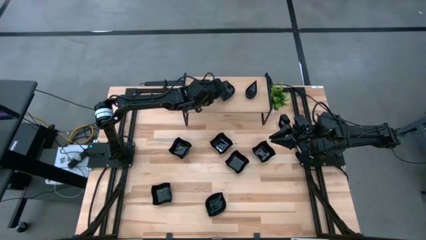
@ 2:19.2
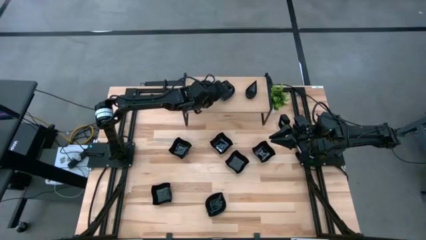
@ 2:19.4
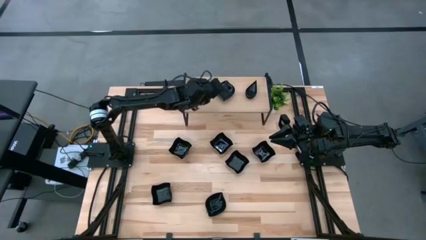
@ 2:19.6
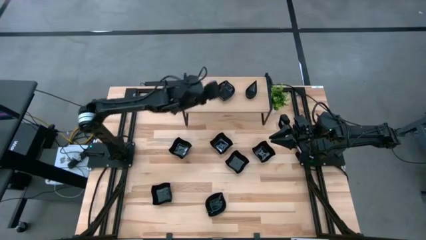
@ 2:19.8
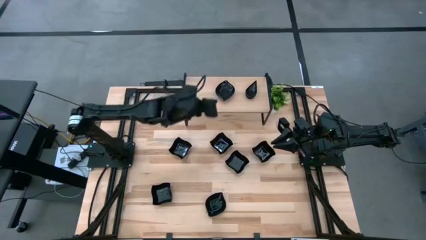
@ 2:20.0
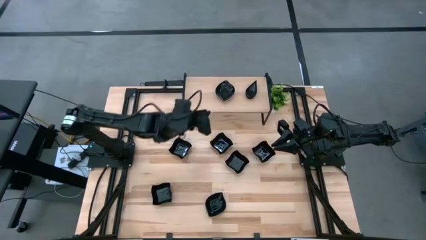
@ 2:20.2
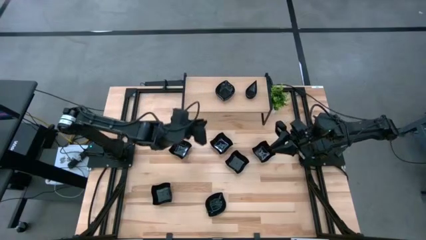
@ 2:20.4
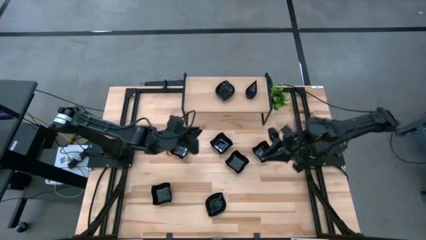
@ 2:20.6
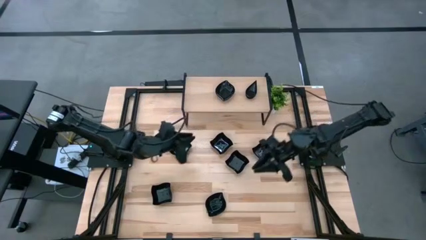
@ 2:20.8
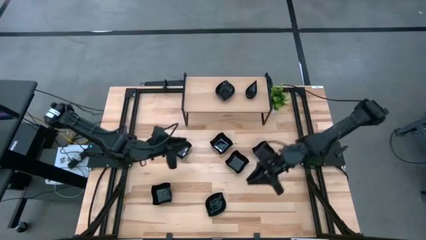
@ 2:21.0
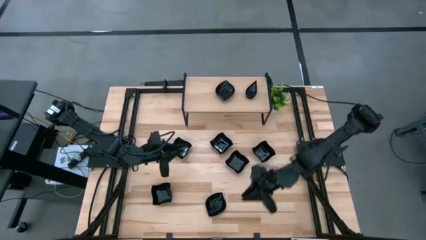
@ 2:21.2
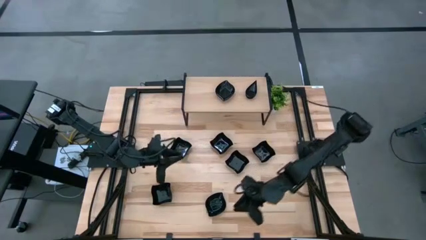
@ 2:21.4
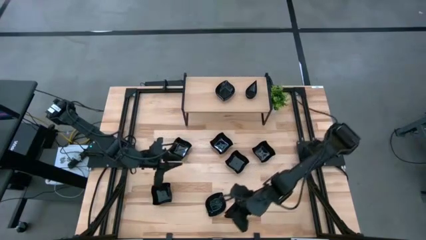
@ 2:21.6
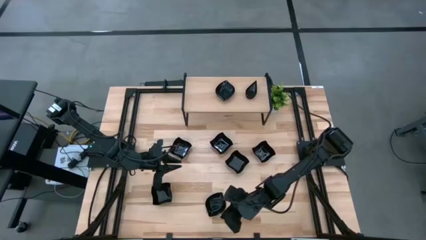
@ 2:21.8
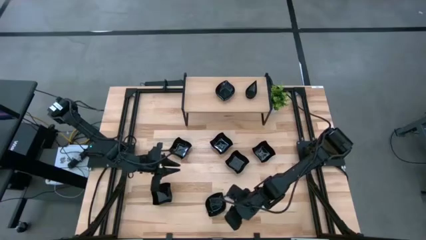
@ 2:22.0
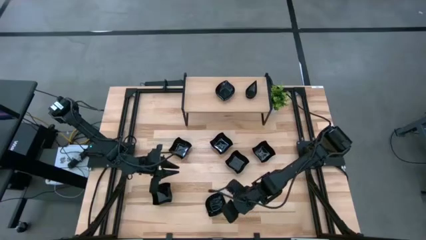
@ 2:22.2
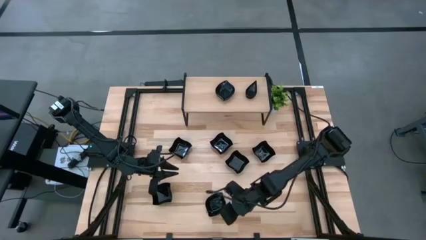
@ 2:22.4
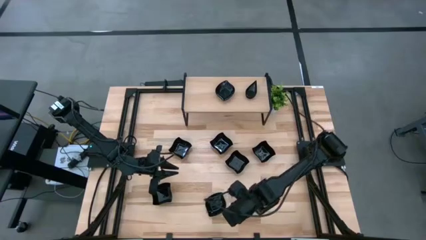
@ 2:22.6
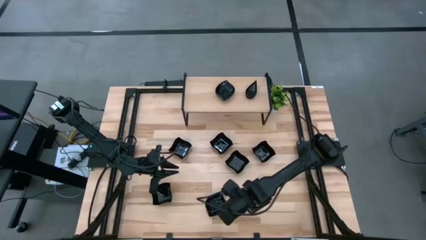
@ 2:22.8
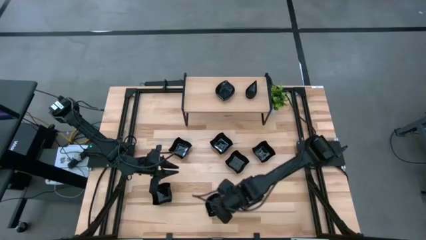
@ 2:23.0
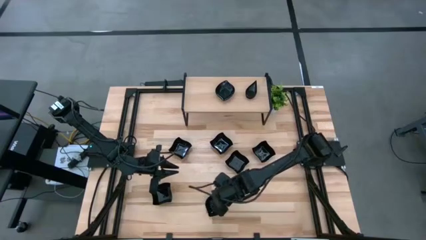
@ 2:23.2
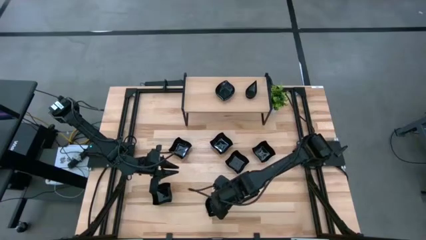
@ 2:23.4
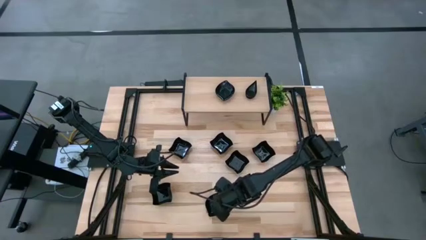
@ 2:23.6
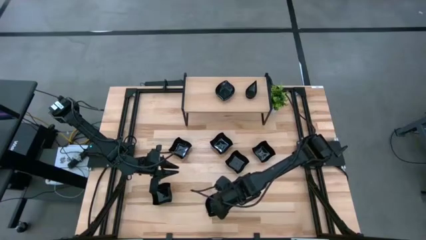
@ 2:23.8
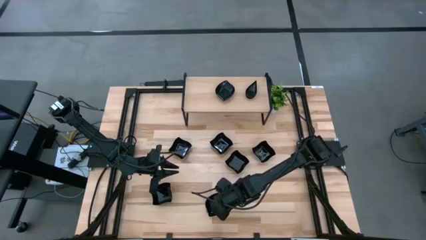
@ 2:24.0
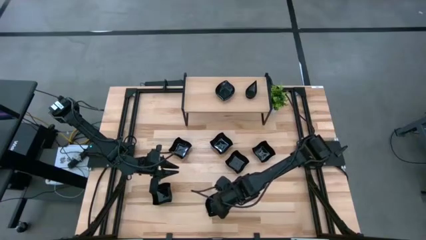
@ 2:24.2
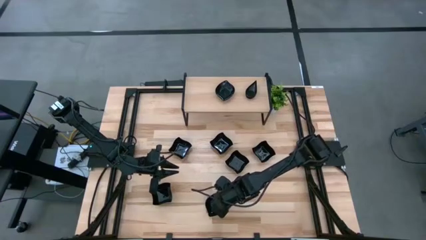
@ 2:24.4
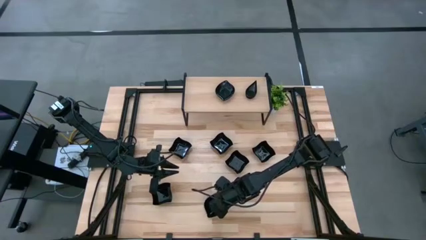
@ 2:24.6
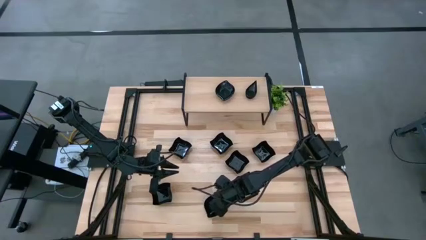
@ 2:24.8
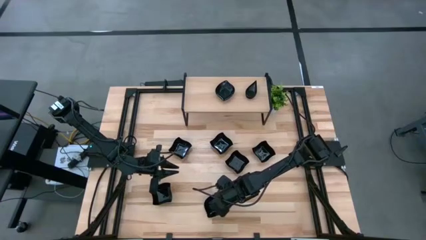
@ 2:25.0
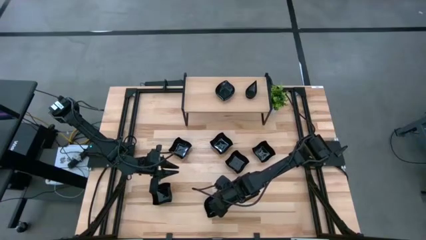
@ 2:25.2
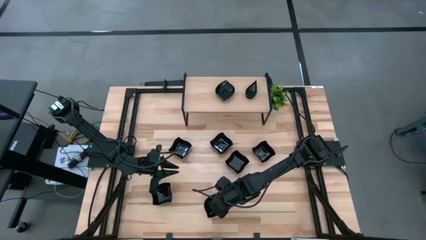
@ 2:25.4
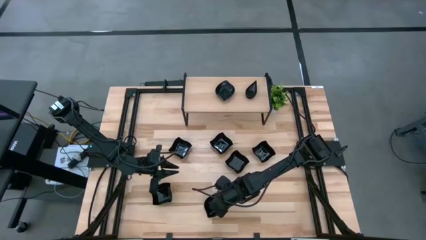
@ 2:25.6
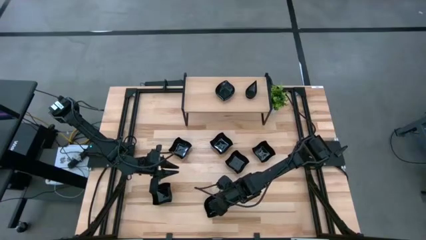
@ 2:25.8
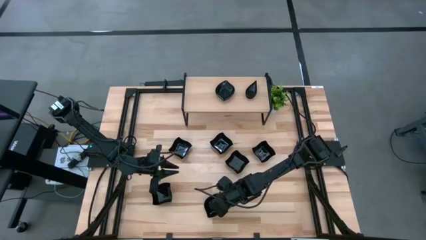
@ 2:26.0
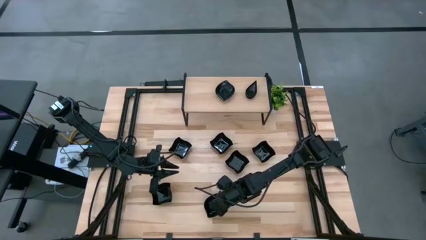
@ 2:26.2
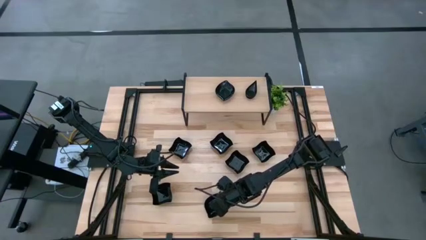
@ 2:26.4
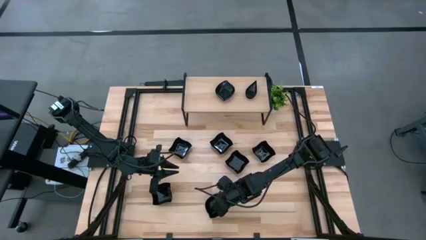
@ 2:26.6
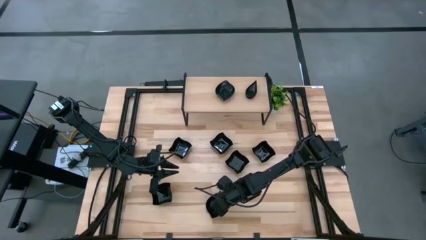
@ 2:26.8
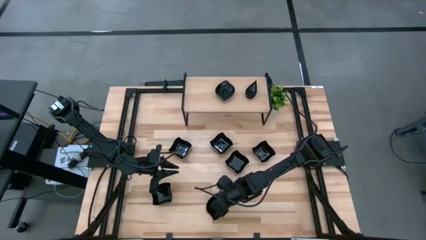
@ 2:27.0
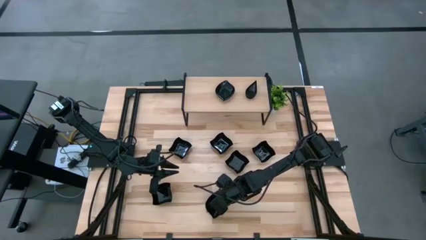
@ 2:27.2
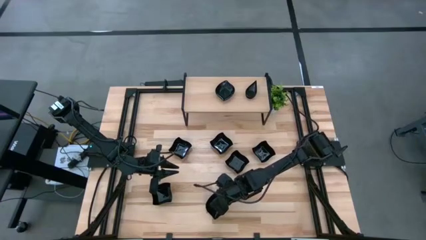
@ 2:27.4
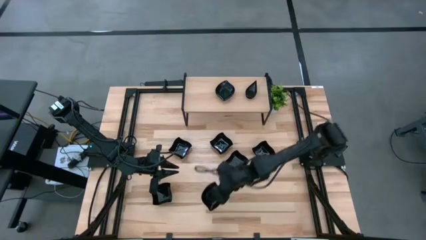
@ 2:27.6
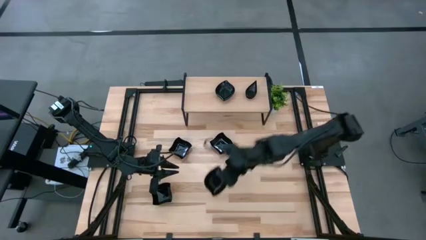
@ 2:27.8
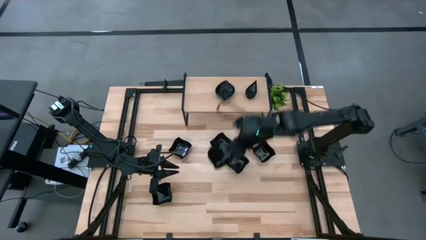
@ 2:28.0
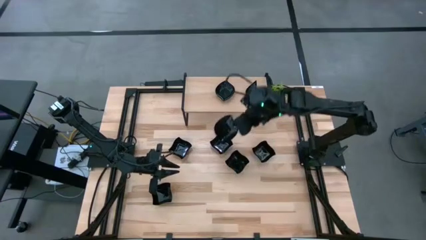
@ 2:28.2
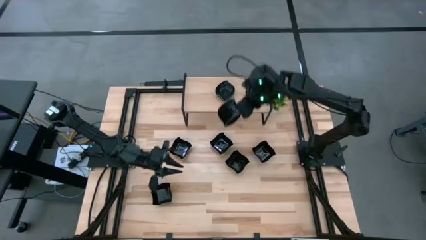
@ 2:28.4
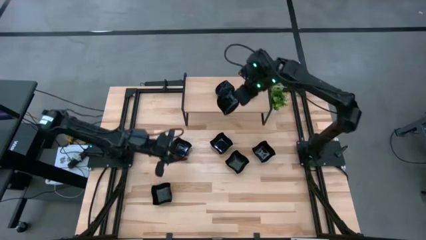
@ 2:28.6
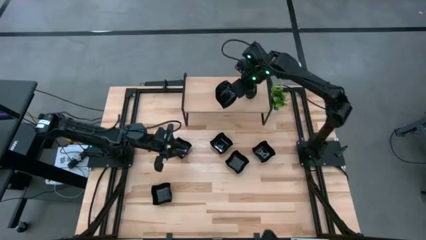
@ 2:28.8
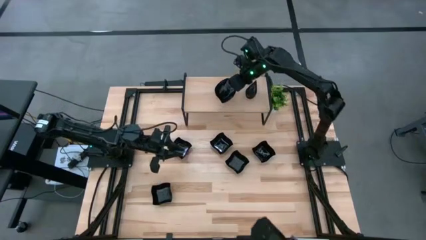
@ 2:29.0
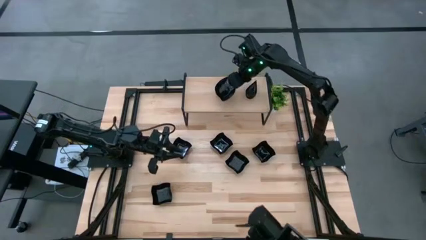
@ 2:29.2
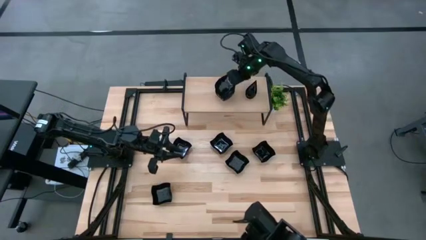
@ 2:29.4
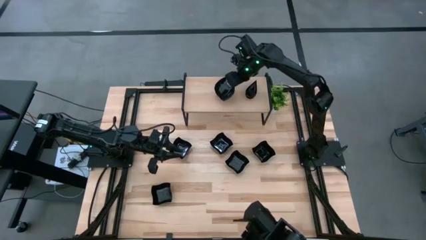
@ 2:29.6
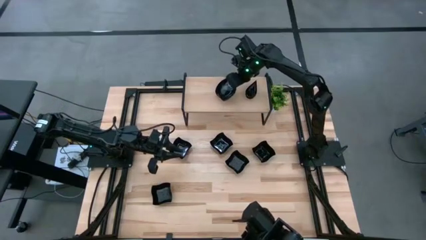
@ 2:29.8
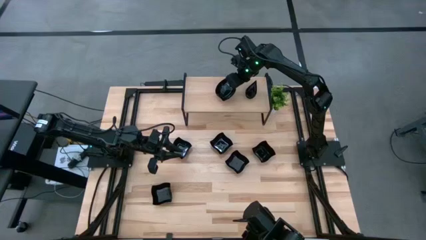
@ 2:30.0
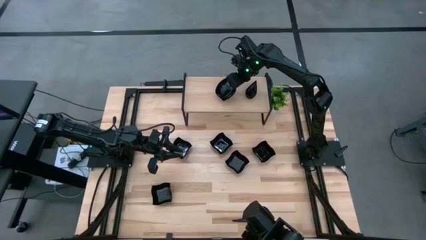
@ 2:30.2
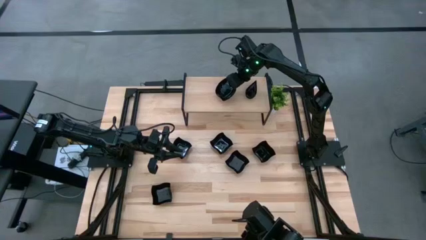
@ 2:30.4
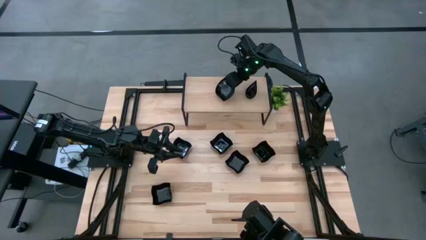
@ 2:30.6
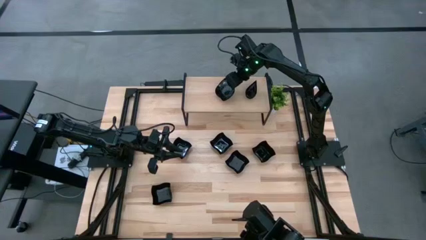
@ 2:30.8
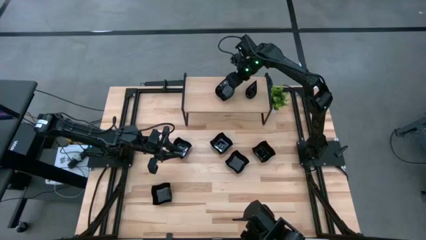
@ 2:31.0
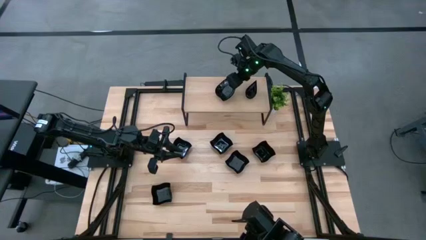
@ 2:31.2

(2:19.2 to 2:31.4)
Task: Pick & Place Mini shaped plates
Stack the black leaf shaped plate on top of the other black leaf shaped plates on the shelf

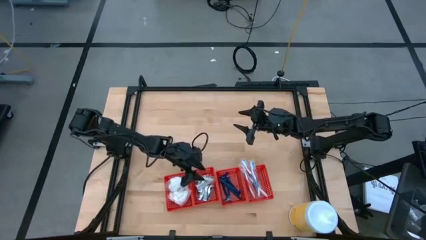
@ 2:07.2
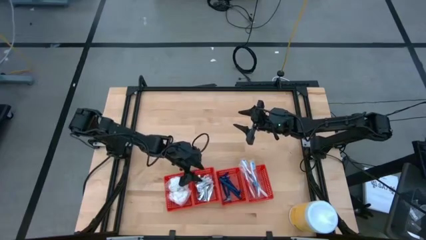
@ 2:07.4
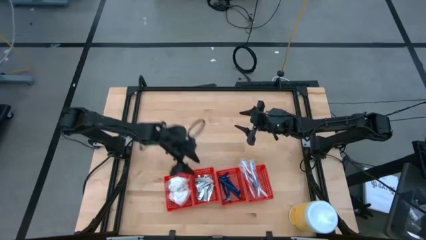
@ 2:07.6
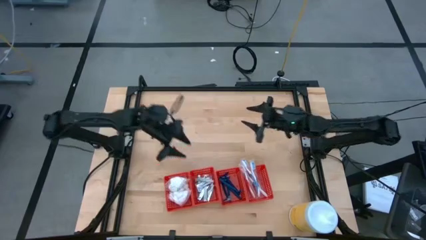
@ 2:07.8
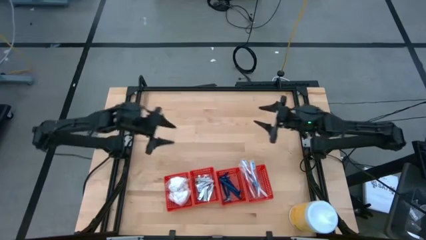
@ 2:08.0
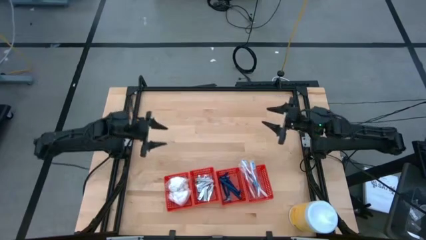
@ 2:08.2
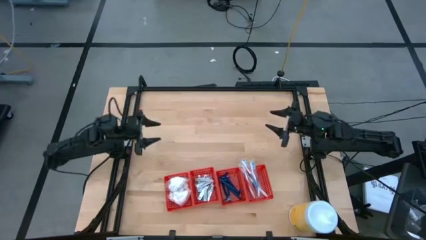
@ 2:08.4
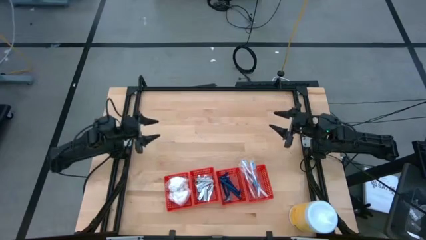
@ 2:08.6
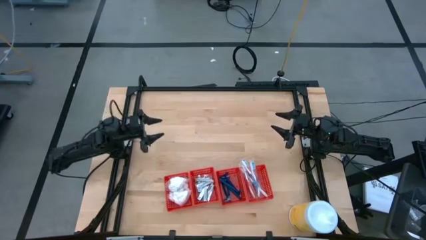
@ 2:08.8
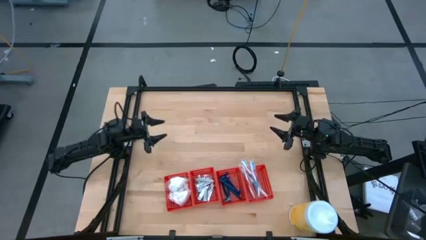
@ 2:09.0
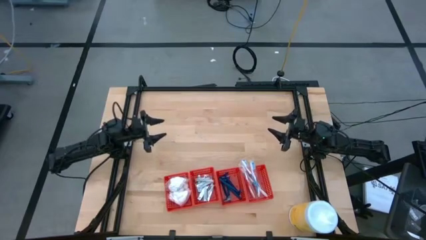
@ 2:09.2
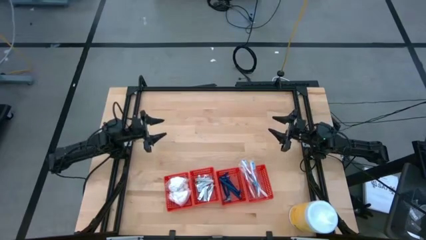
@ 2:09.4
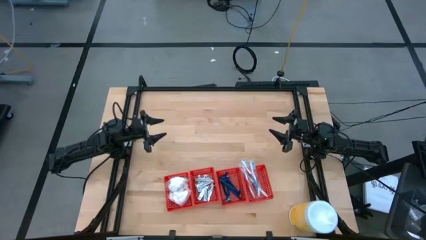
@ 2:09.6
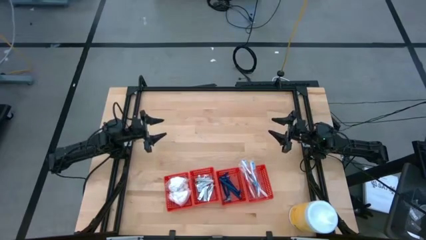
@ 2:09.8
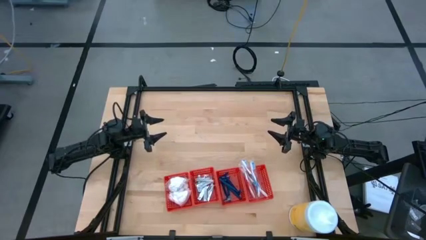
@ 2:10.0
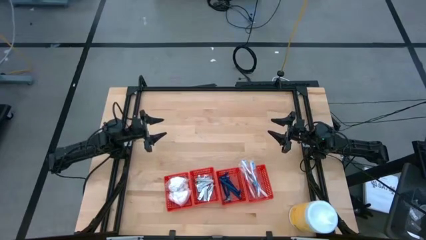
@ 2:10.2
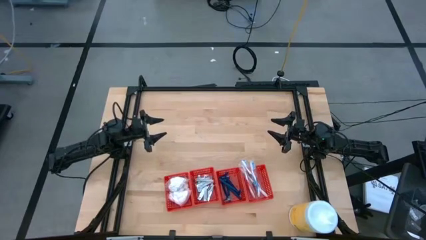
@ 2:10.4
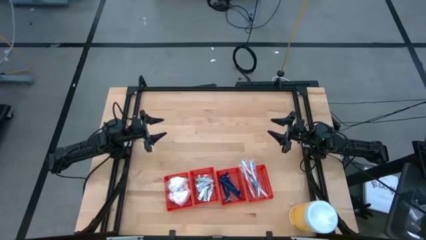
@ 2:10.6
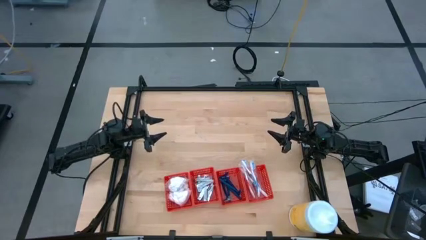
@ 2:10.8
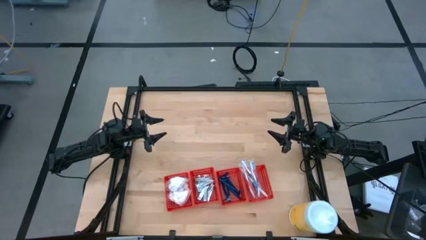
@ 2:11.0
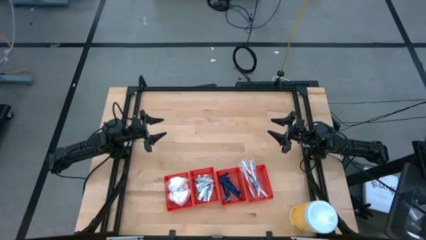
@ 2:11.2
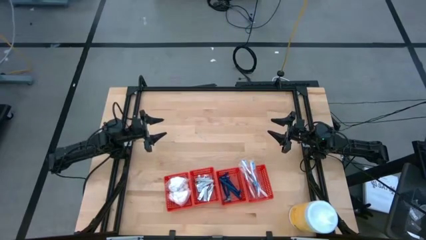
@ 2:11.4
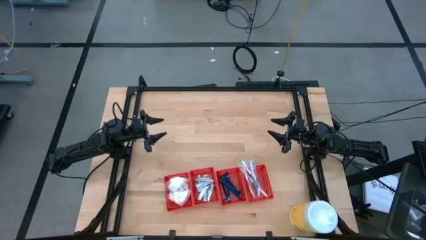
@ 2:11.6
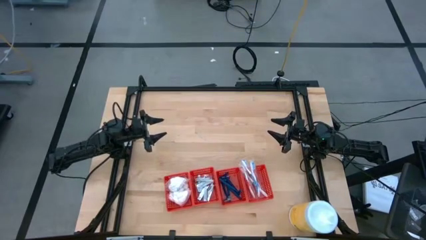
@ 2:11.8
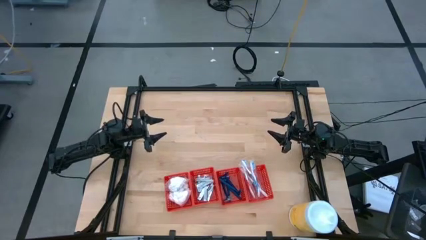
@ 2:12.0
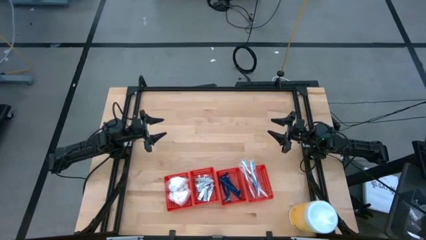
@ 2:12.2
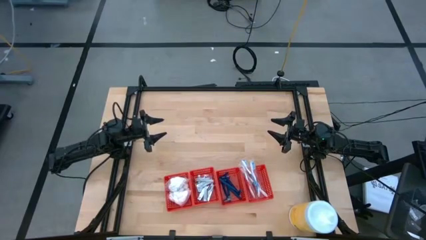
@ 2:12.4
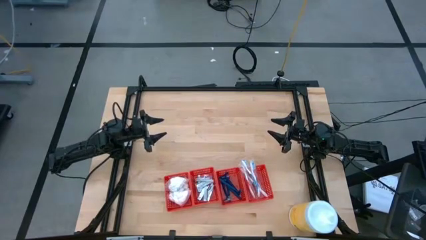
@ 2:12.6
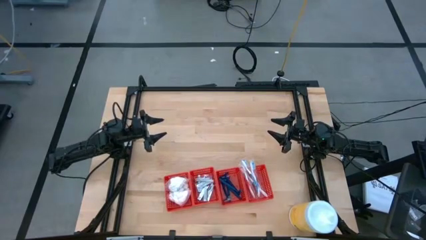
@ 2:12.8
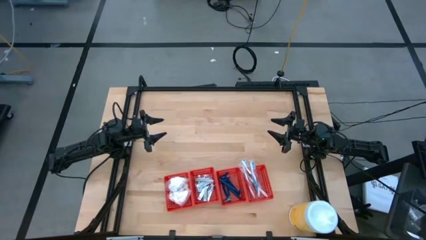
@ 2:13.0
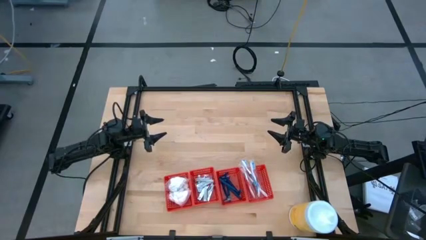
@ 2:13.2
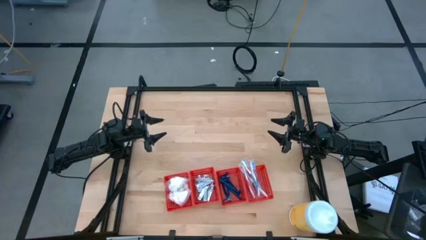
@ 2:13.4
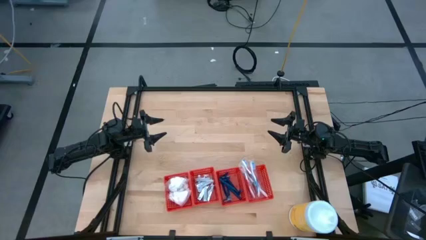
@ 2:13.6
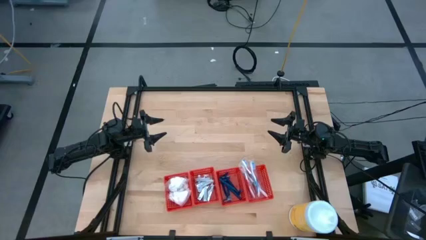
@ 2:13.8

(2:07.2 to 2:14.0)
Task: Pick & Place Travel size toiletries
Return to Home Position
